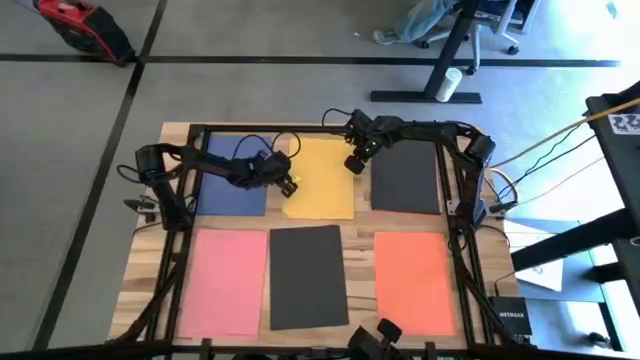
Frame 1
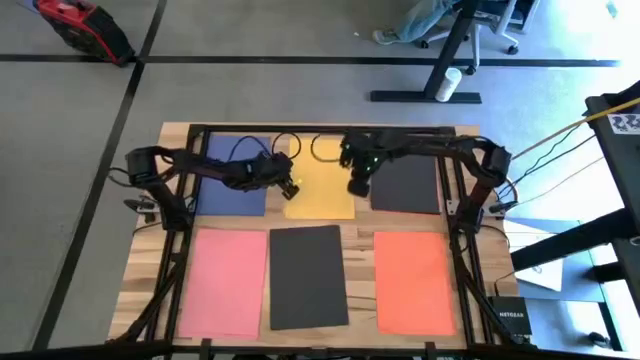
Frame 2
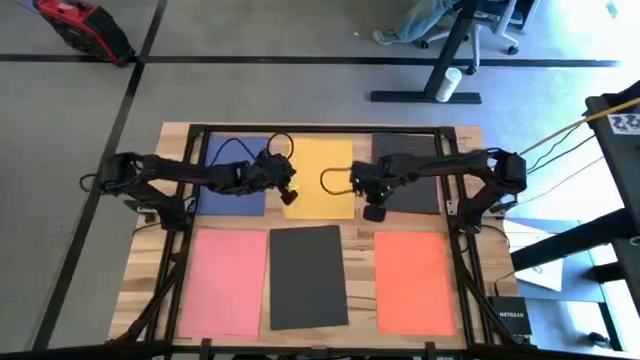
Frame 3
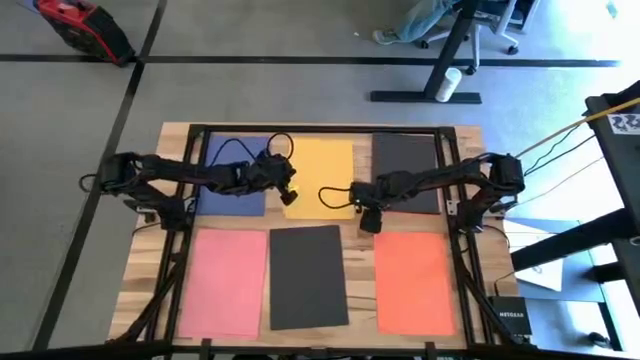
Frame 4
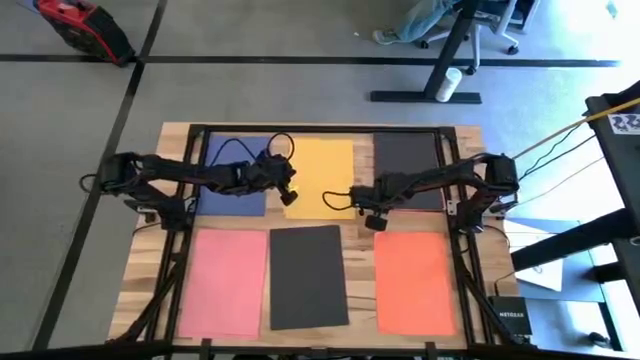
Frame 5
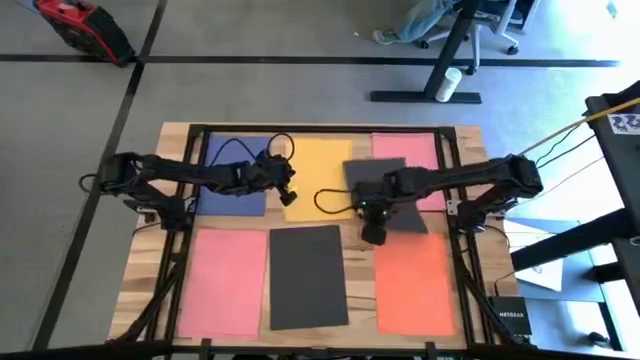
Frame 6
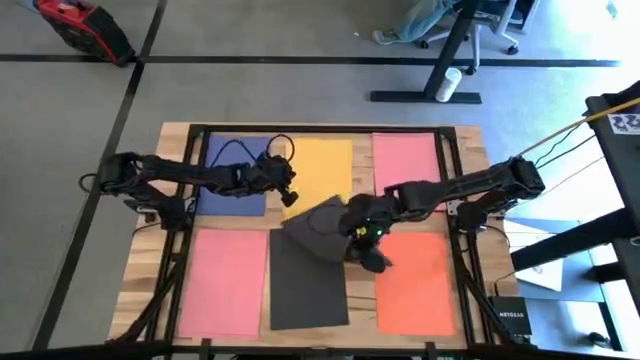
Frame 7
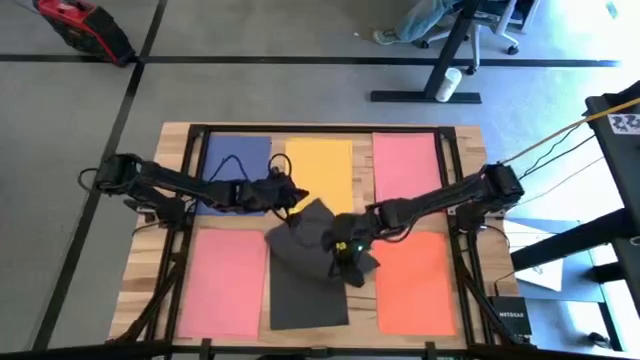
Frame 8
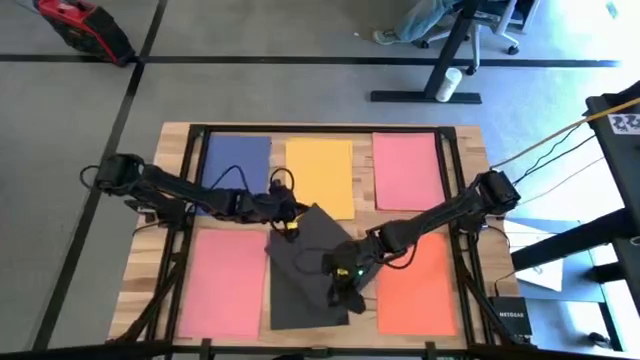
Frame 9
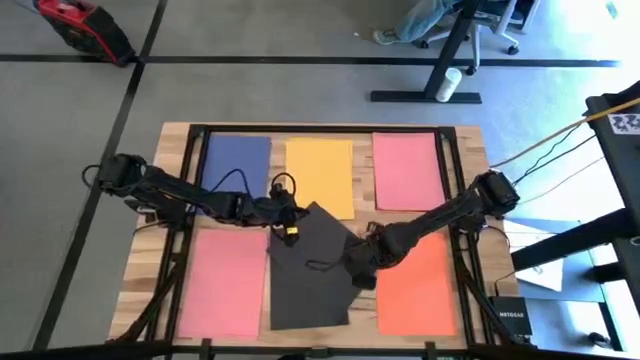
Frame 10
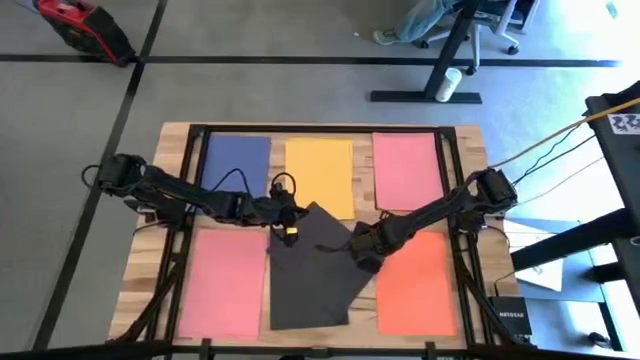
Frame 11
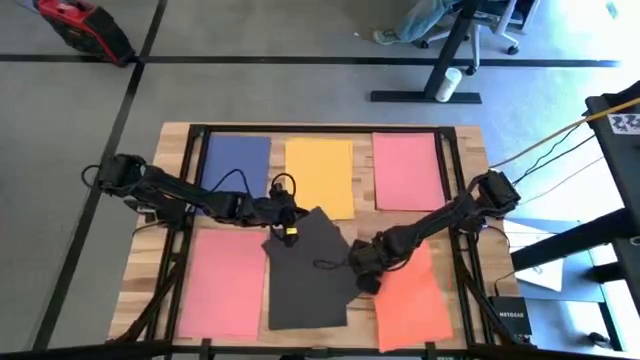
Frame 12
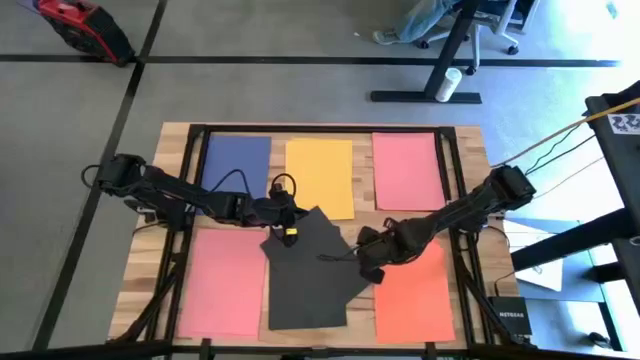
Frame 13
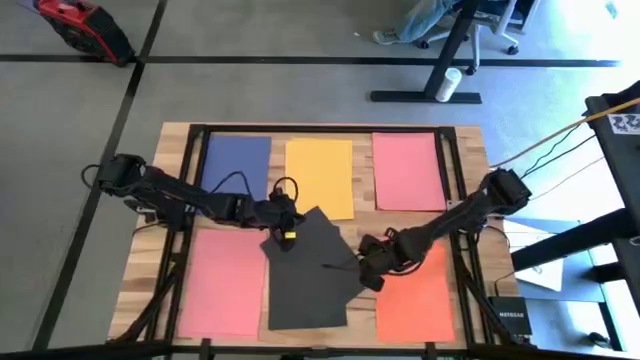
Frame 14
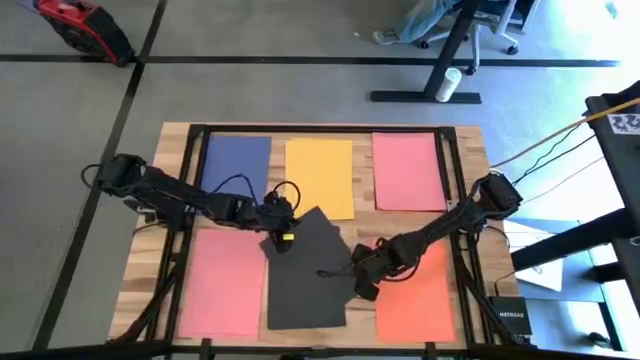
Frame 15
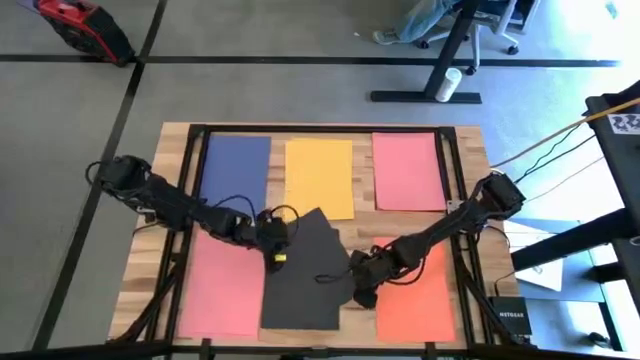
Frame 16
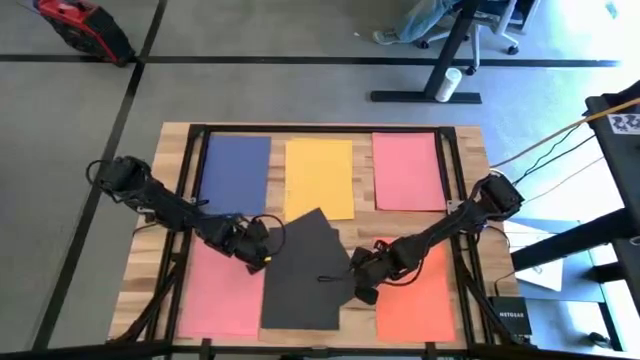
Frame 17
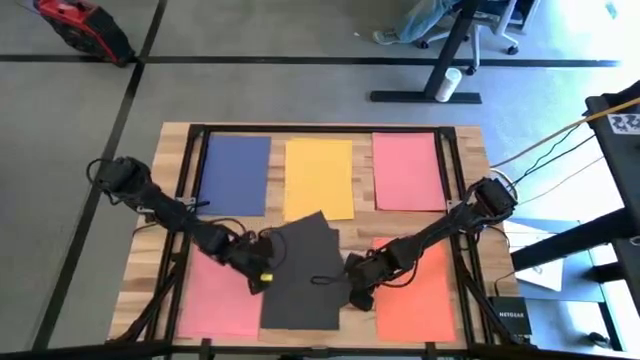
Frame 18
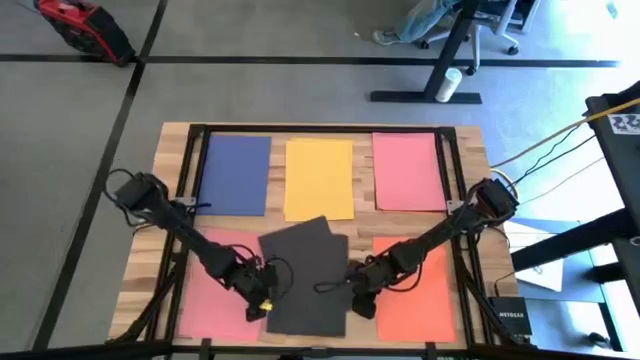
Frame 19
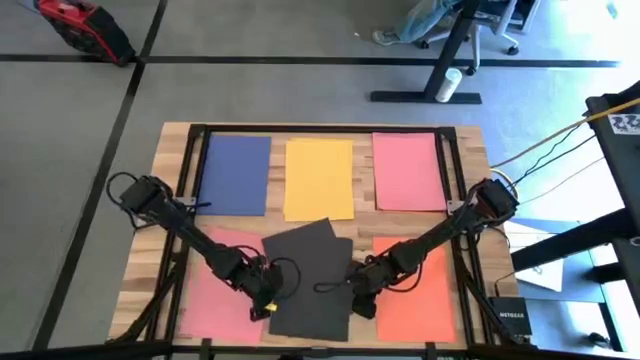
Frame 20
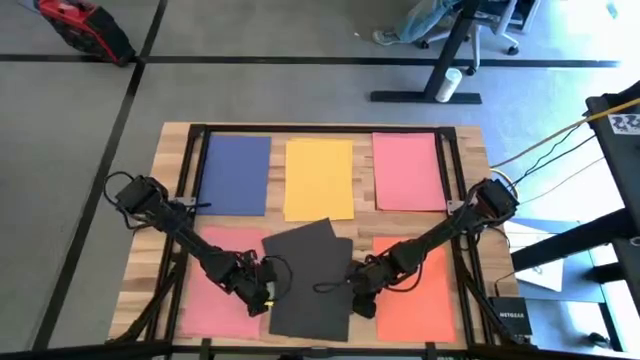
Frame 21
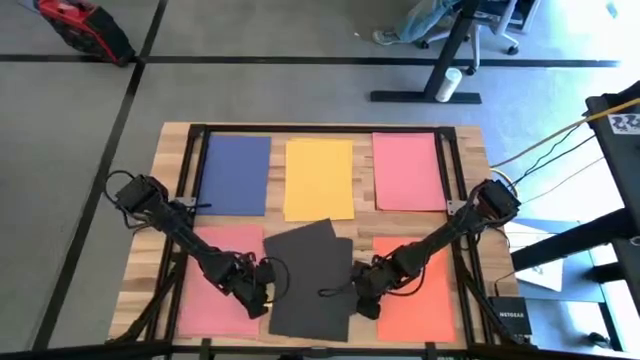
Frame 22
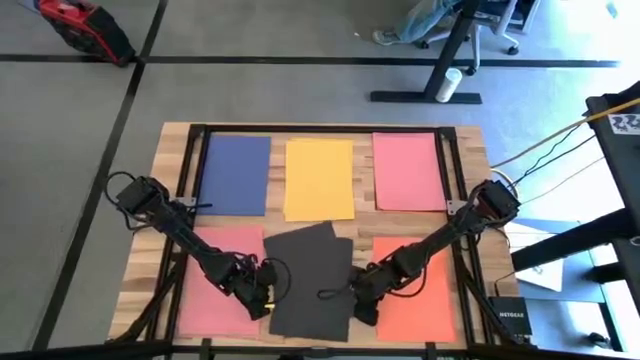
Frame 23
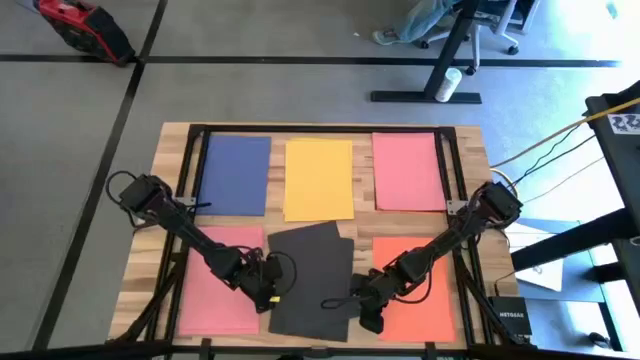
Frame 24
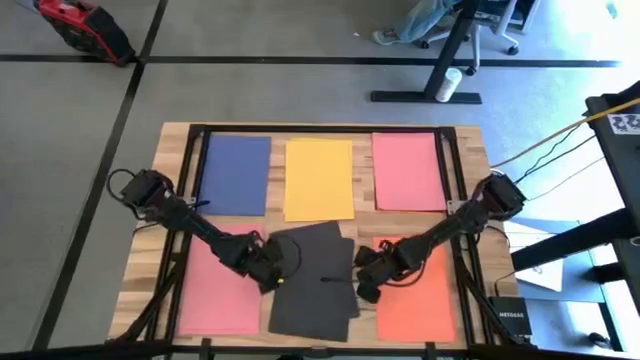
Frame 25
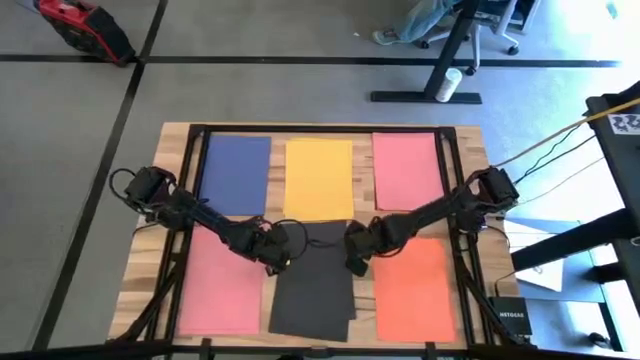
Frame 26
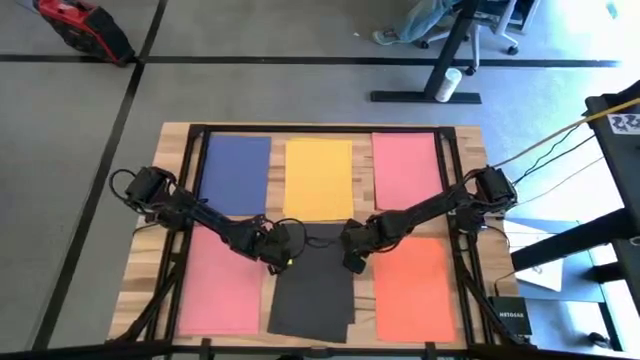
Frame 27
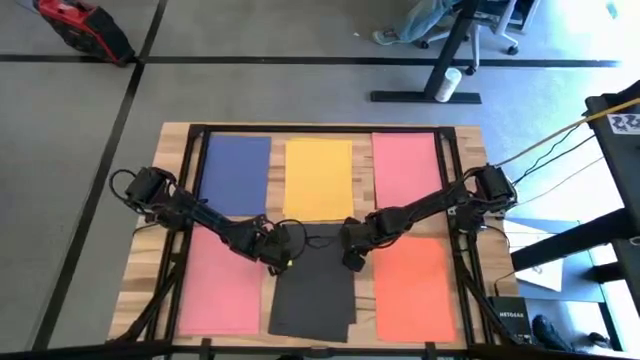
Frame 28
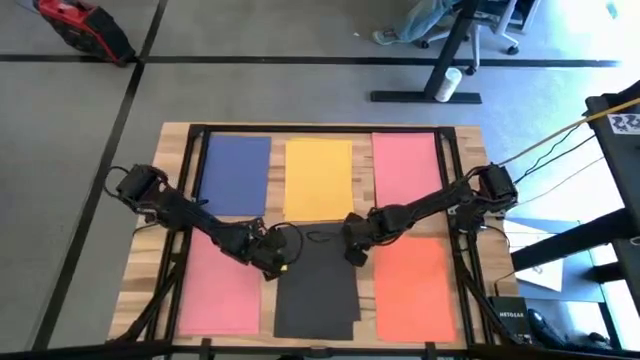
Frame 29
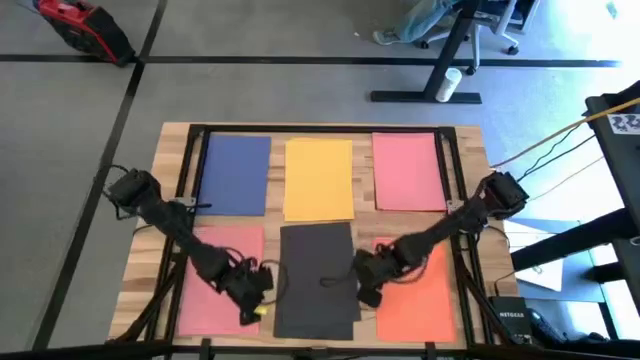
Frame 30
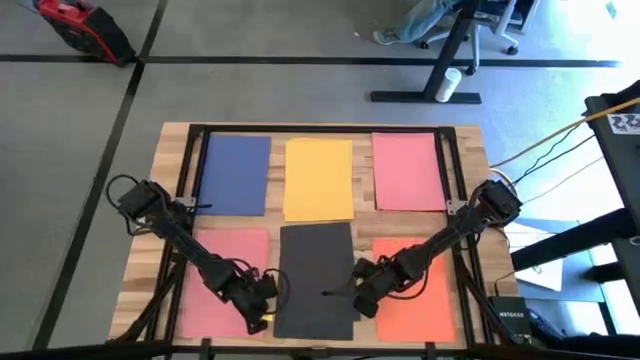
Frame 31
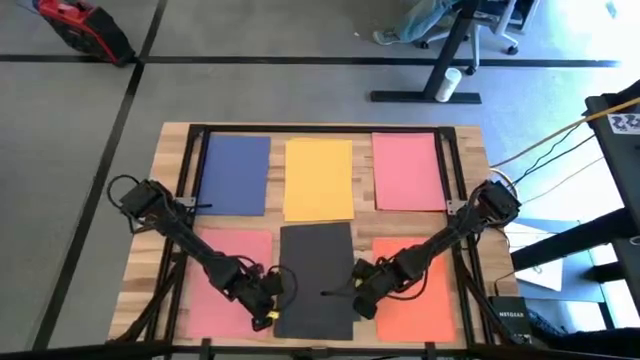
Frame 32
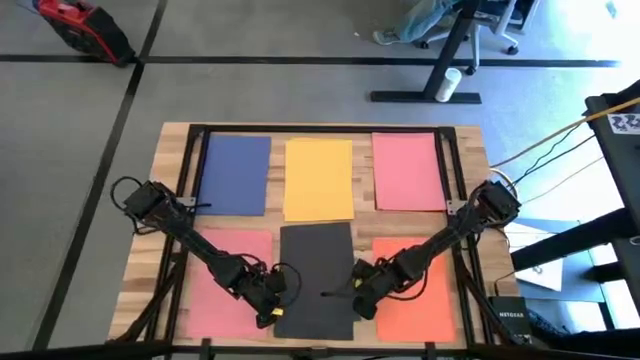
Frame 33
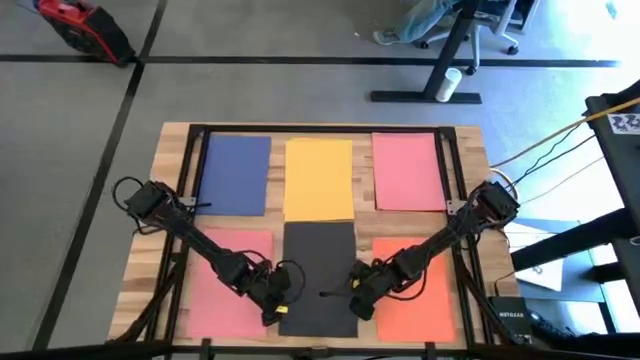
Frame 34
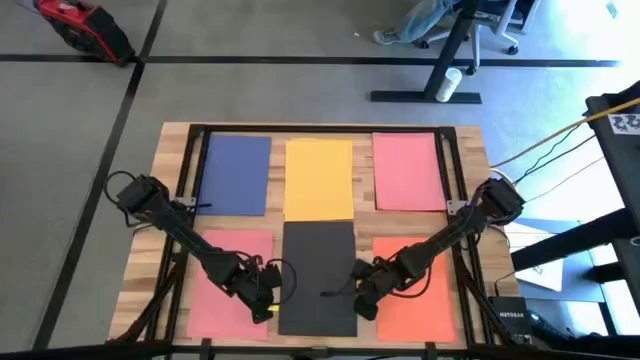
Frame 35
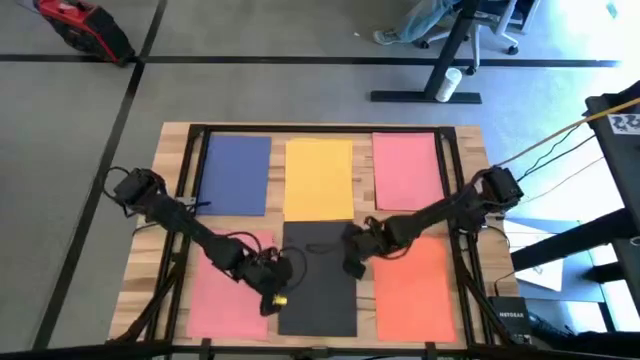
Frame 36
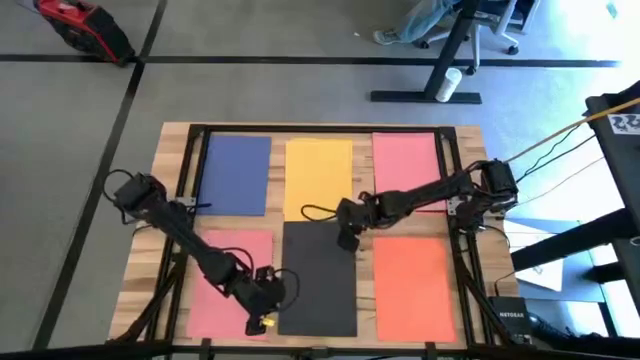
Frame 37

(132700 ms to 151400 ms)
Task: Organize paper
Stack the black paper on top of the other black paper

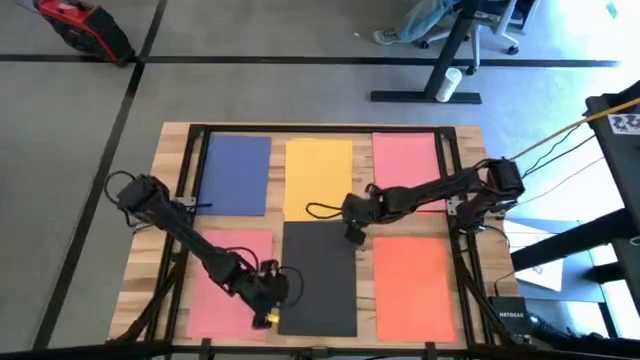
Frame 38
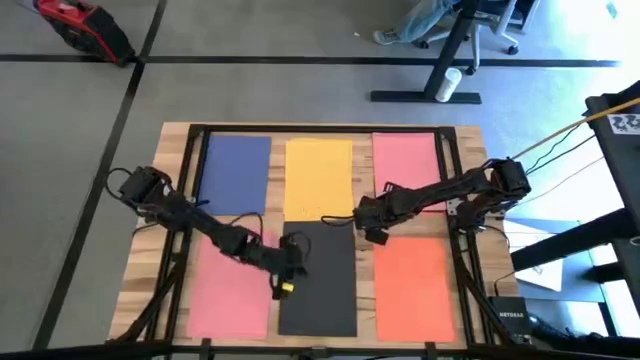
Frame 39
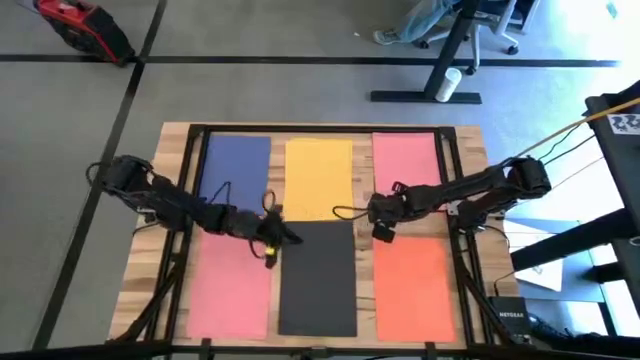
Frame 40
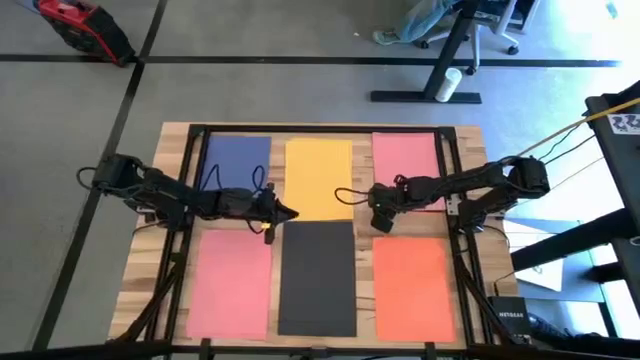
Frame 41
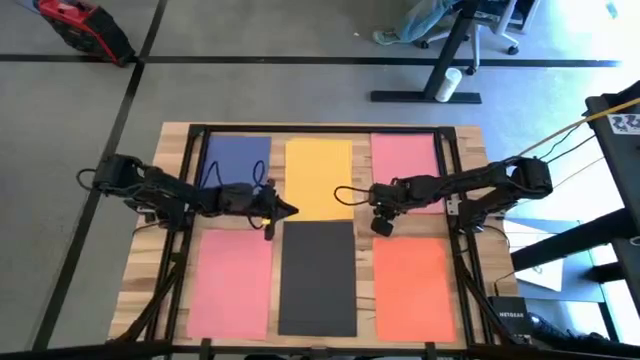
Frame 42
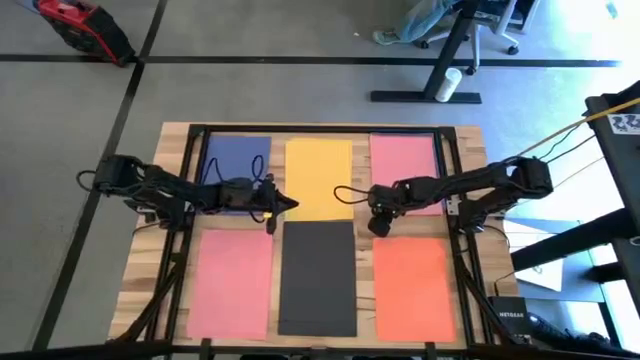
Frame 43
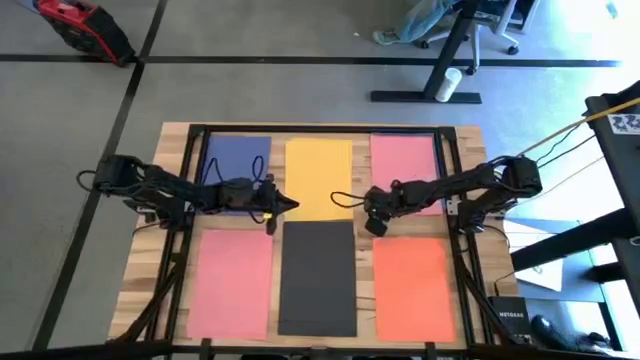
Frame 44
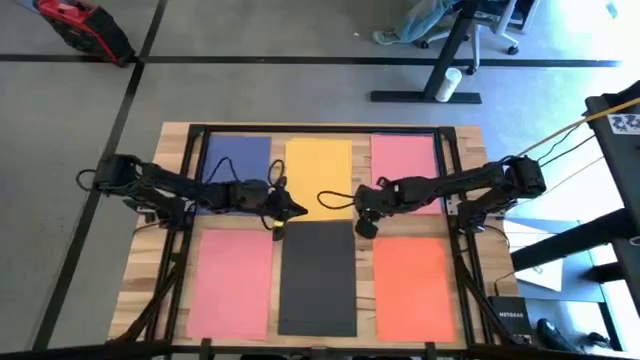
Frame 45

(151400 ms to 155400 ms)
Stack the pink paper on top of the other pink paper
